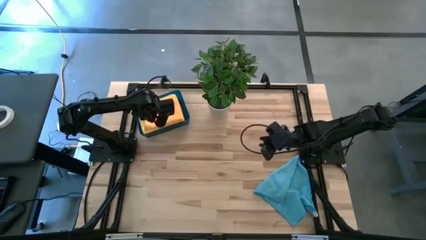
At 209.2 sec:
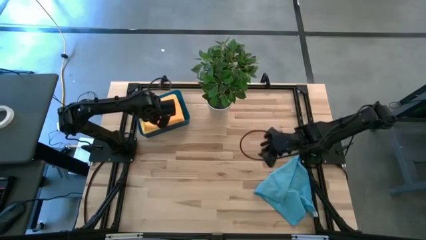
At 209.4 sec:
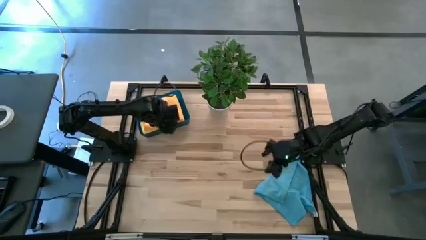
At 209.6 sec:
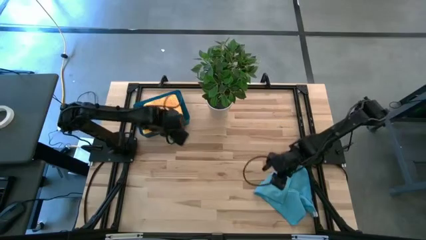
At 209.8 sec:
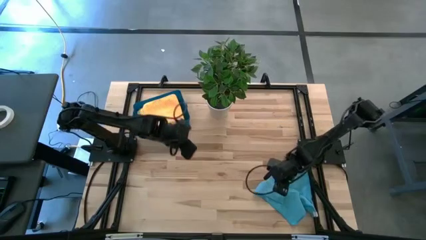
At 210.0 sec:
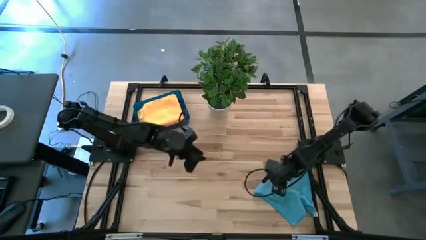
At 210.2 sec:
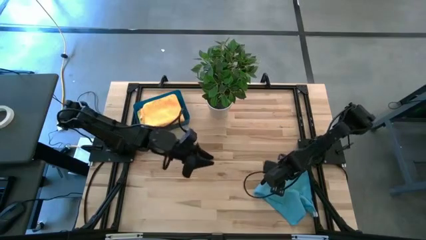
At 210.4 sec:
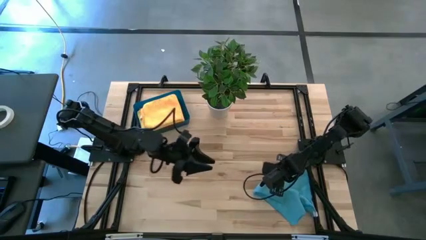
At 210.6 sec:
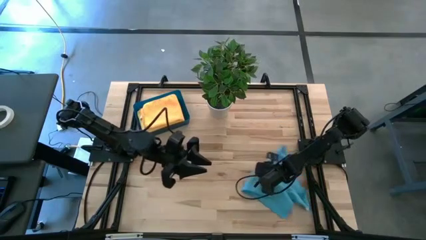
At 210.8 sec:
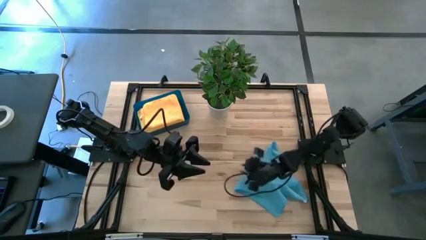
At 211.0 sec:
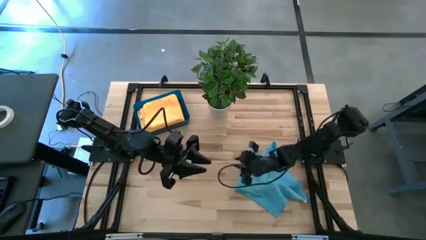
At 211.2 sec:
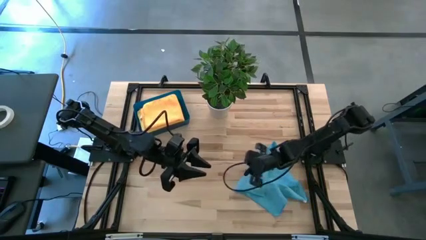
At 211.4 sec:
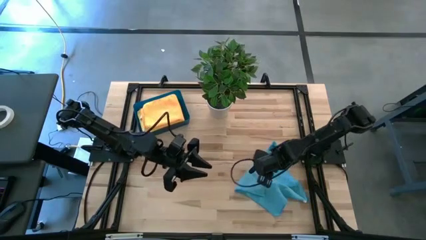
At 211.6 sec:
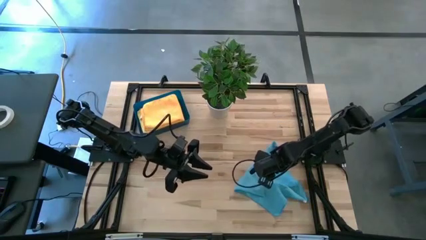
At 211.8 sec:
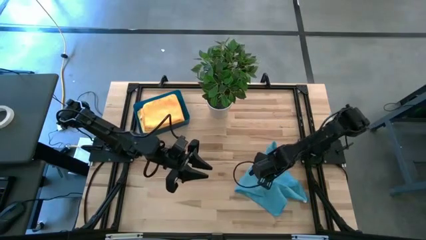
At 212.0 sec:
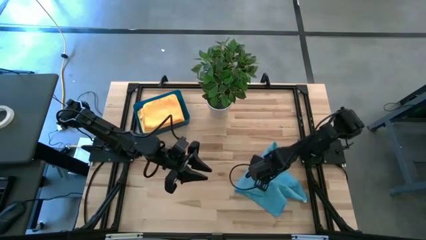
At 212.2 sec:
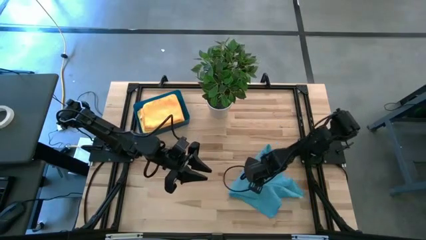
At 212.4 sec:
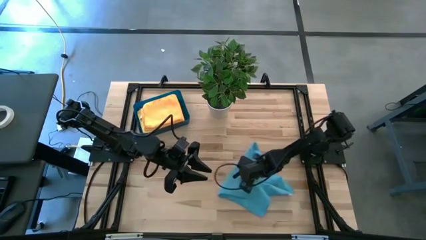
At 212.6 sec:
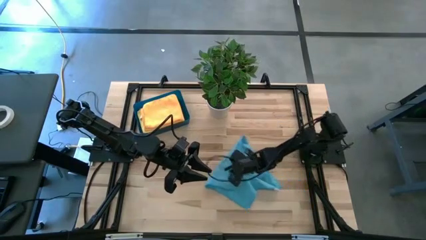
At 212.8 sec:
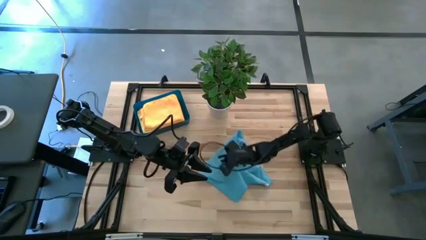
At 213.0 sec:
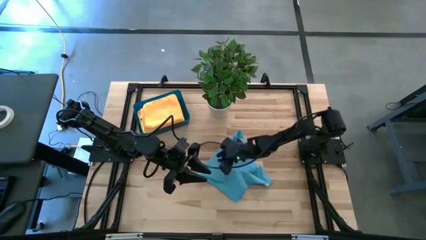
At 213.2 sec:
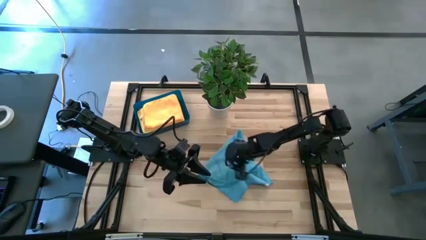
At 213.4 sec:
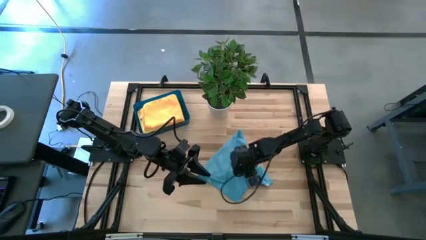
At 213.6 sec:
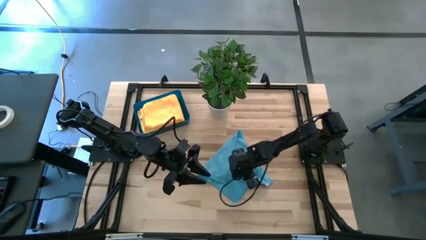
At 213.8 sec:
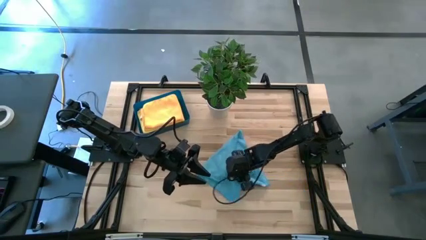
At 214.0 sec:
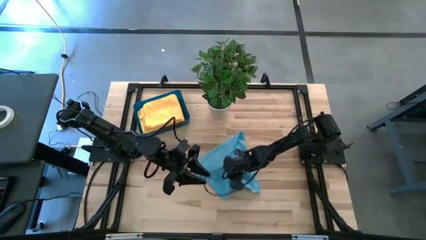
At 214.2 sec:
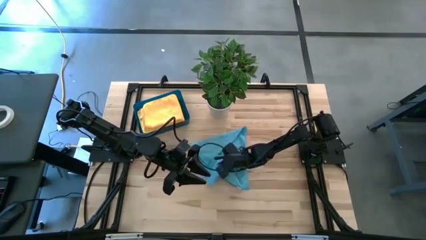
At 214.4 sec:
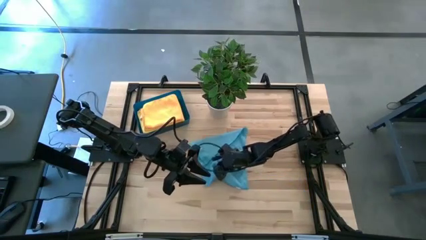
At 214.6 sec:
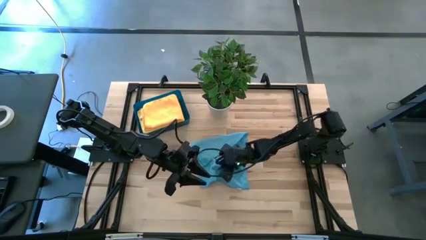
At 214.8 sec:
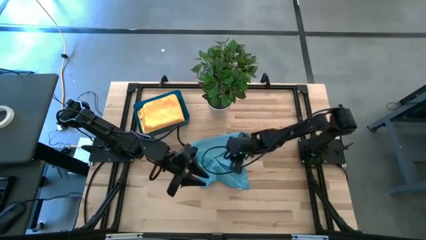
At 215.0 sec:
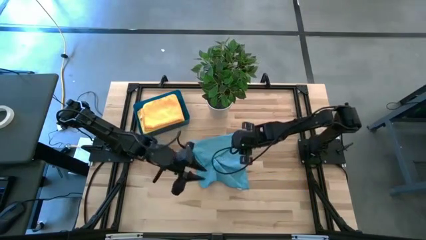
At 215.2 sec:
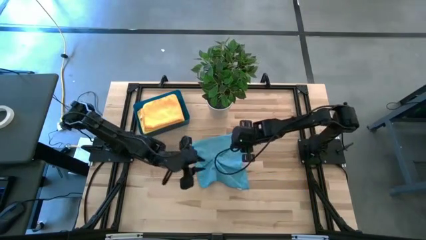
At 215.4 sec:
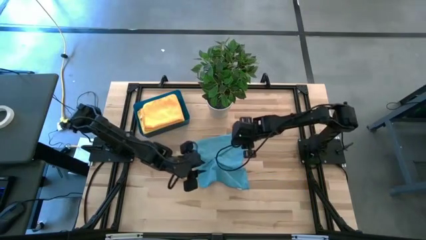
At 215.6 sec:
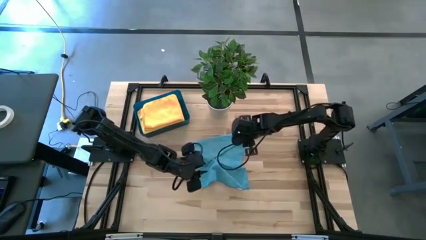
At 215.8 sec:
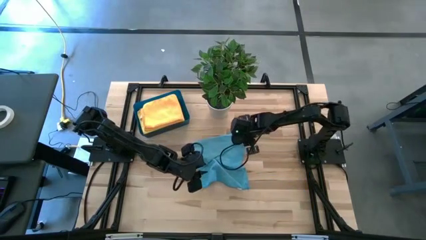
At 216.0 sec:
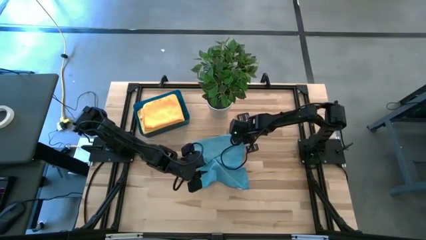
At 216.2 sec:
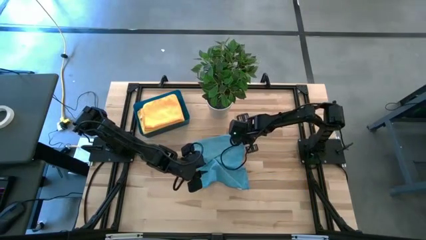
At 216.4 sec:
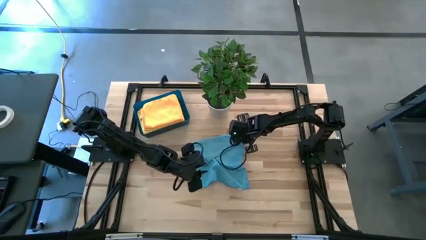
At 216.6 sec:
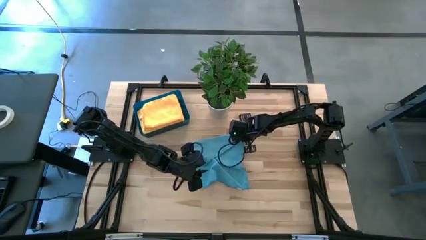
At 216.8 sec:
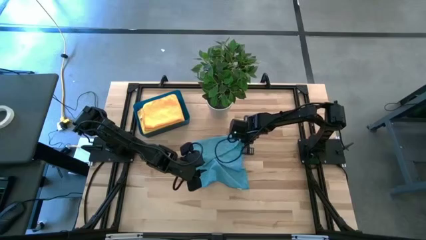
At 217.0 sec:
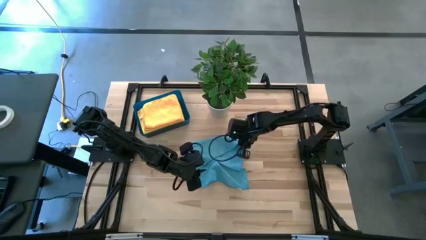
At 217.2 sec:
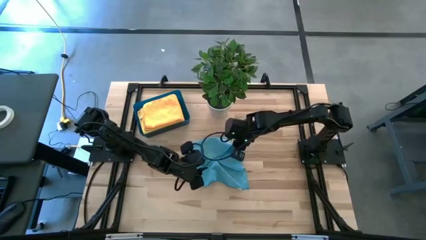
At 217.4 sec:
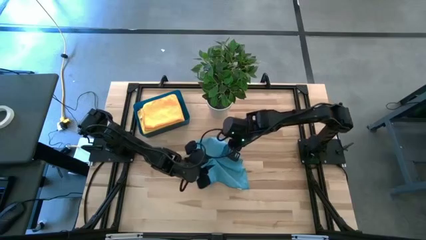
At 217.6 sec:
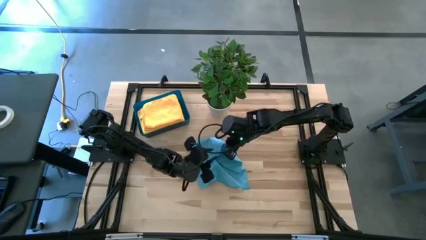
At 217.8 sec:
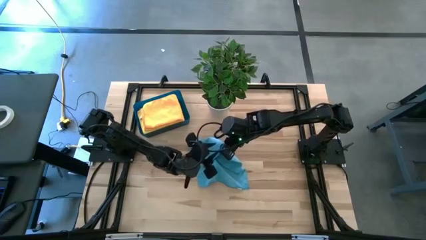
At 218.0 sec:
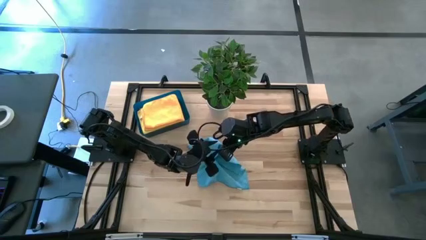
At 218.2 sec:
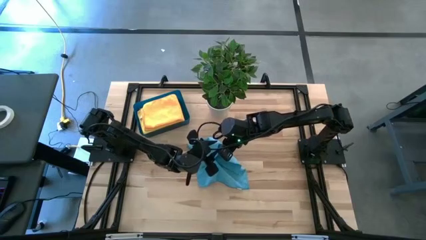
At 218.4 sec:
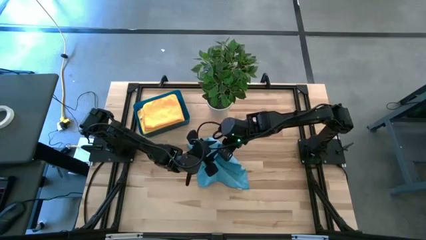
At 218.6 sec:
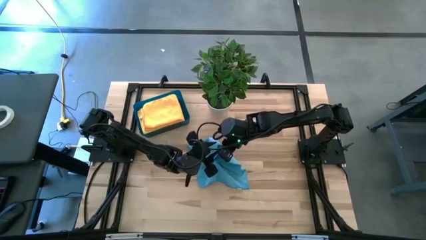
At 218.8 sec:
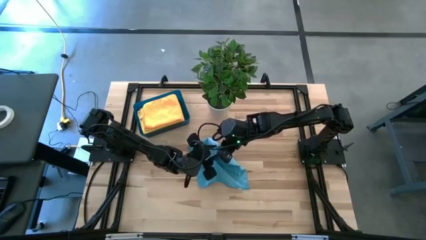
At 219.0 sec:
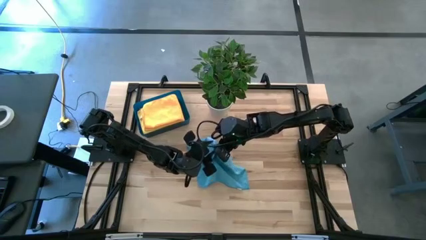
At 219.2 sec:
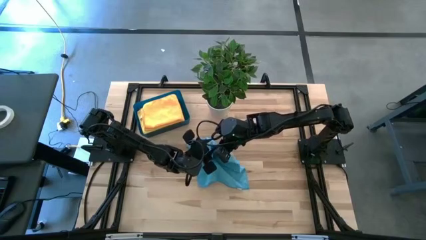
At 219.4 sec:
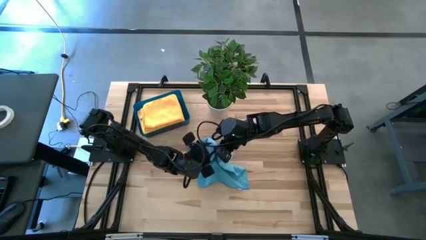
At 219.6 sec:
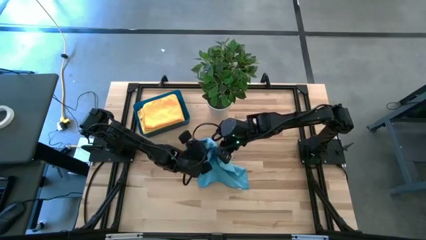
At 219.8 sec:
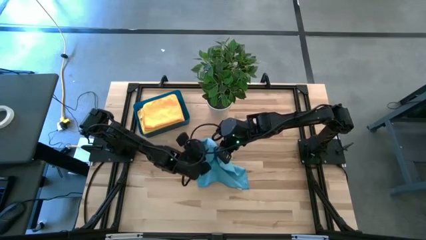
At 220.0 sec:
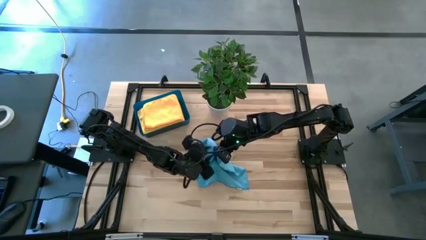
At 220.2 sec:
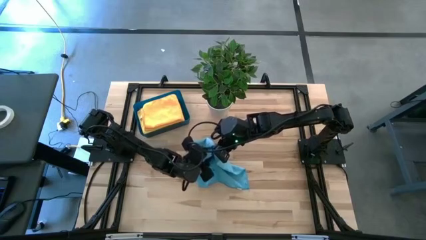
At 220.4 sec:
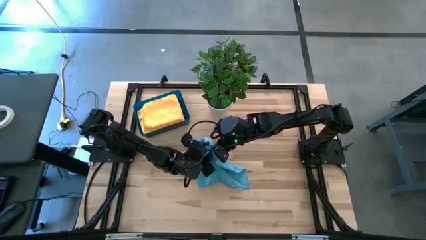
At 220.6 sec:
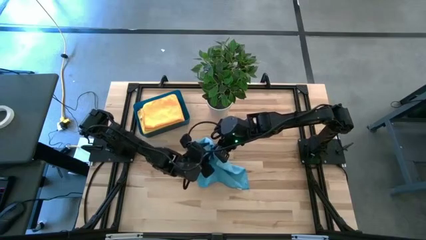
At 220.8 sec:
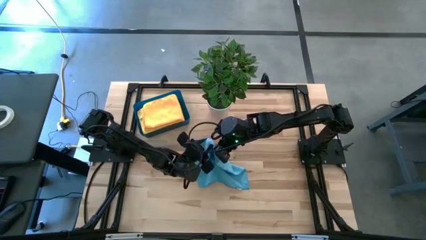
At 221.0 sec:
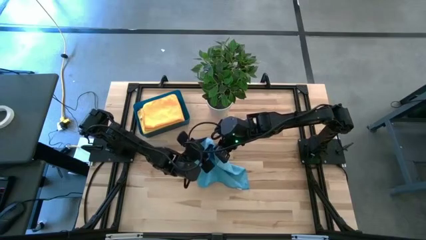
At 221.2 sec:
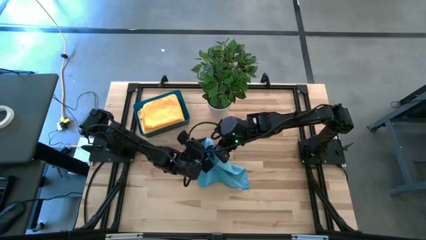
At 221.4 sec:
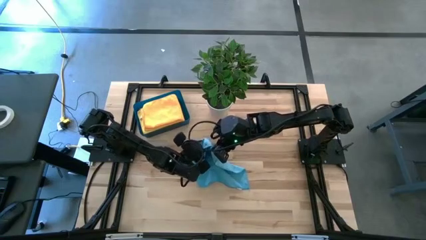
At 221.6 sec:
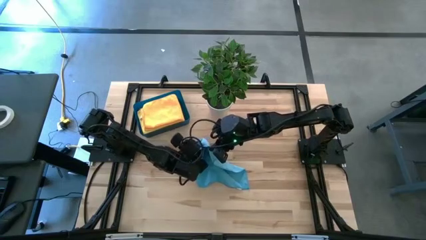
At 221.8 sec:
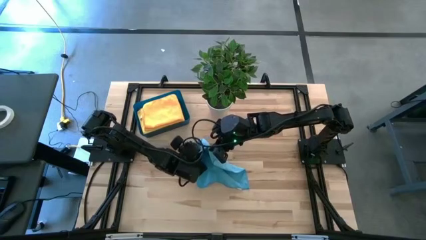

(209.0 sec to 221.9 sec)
Task: Fold microfiber towels
Fold the blue towel
